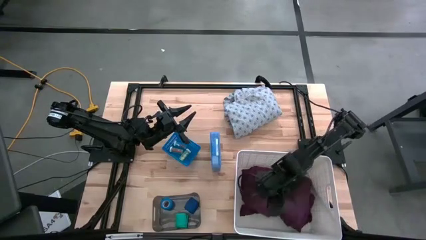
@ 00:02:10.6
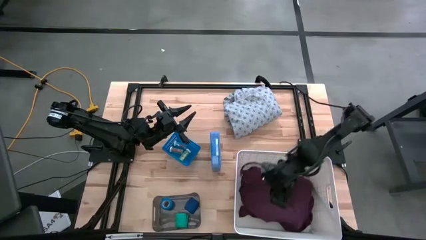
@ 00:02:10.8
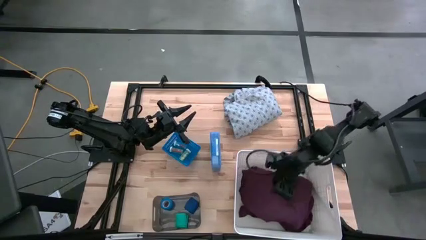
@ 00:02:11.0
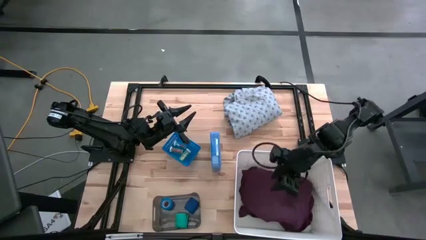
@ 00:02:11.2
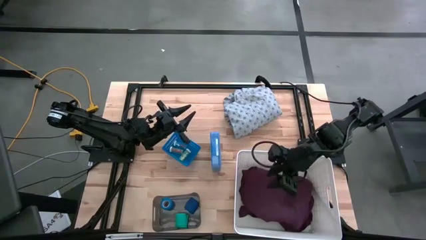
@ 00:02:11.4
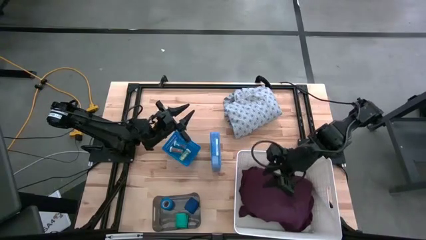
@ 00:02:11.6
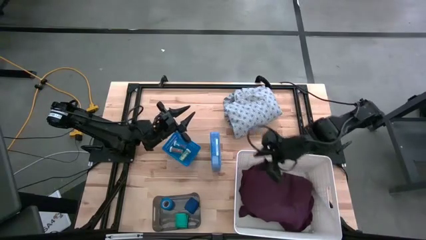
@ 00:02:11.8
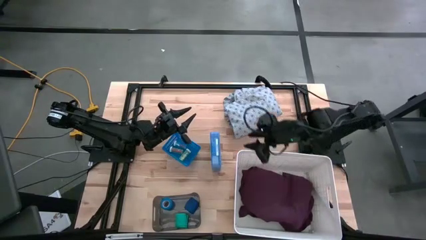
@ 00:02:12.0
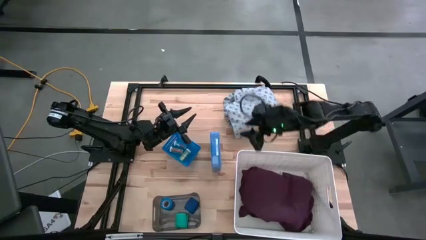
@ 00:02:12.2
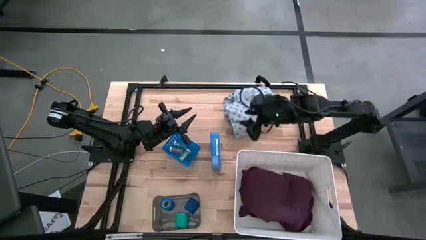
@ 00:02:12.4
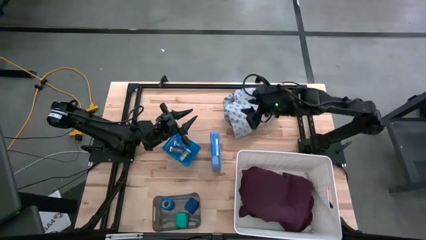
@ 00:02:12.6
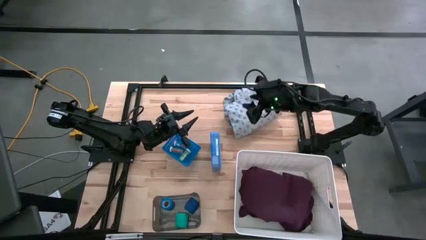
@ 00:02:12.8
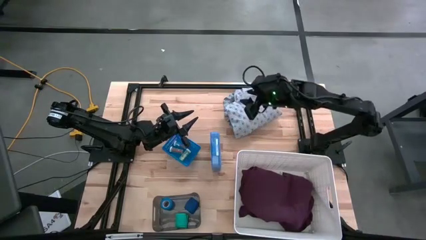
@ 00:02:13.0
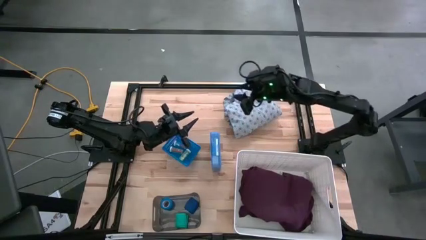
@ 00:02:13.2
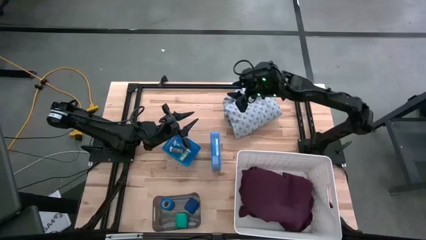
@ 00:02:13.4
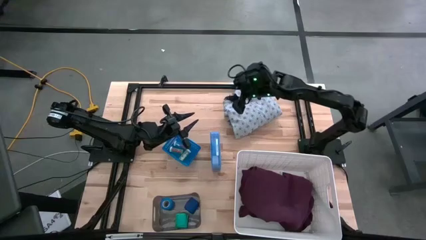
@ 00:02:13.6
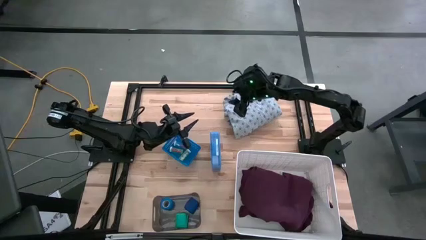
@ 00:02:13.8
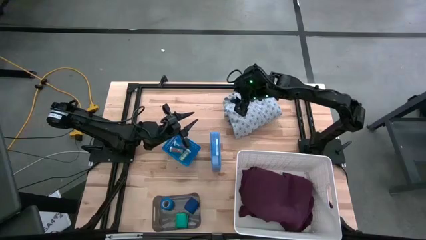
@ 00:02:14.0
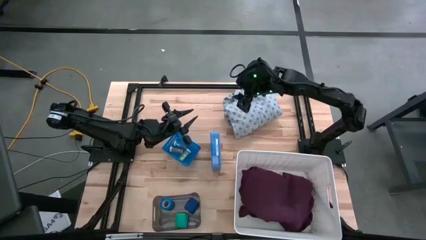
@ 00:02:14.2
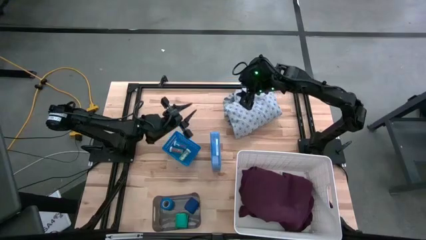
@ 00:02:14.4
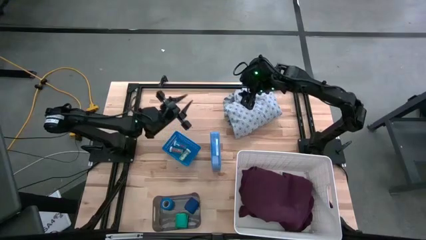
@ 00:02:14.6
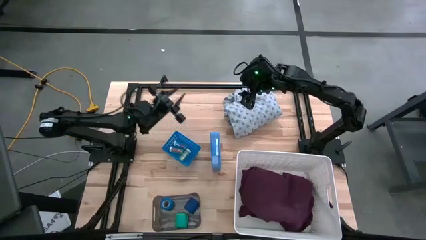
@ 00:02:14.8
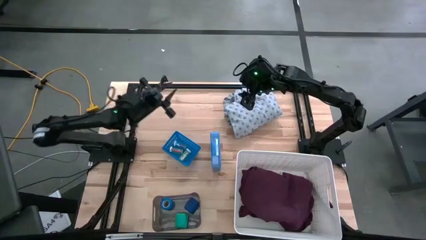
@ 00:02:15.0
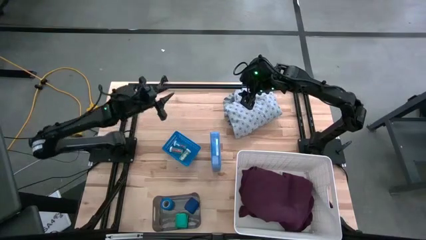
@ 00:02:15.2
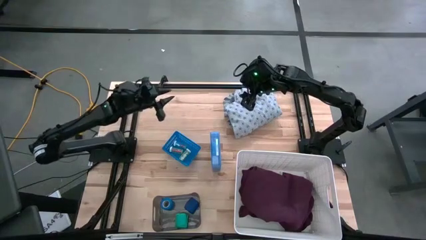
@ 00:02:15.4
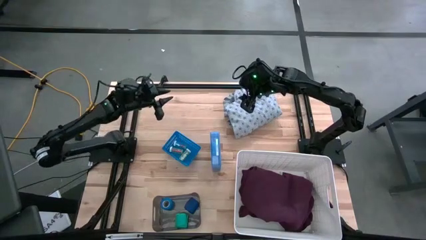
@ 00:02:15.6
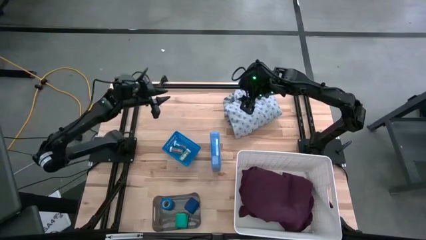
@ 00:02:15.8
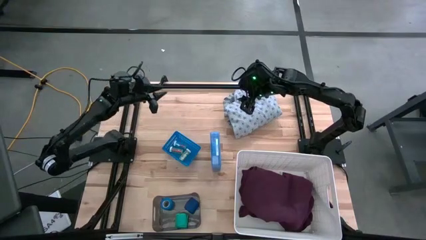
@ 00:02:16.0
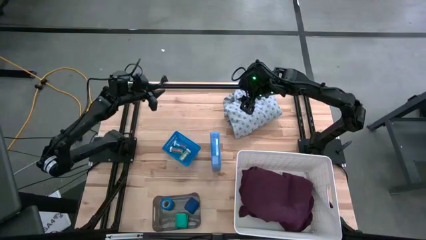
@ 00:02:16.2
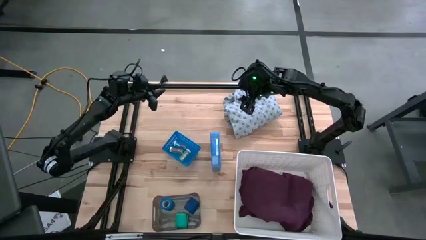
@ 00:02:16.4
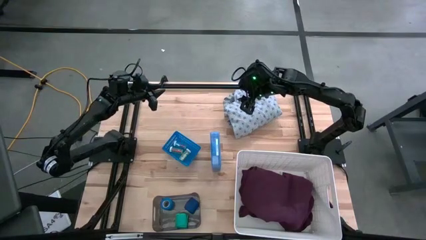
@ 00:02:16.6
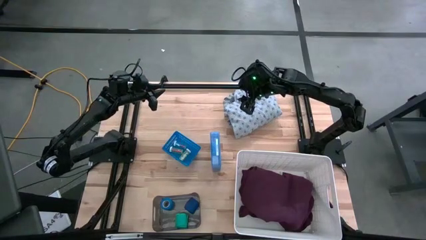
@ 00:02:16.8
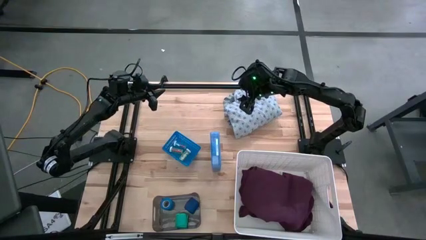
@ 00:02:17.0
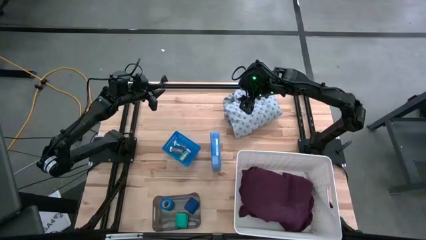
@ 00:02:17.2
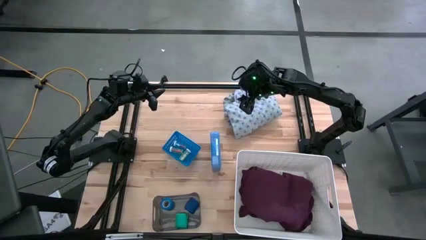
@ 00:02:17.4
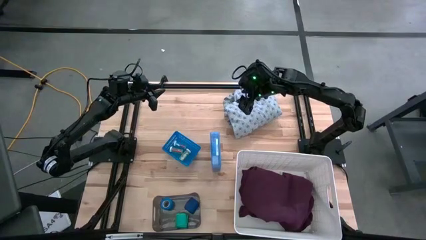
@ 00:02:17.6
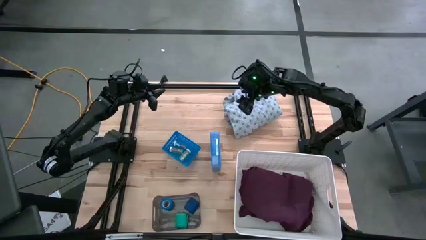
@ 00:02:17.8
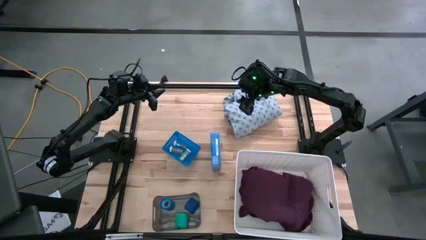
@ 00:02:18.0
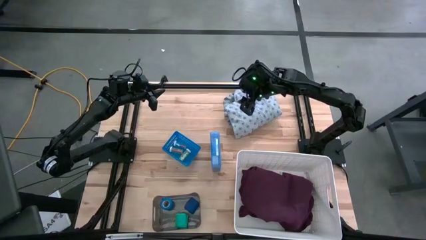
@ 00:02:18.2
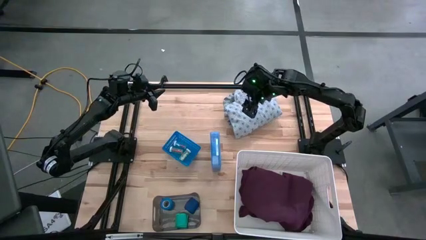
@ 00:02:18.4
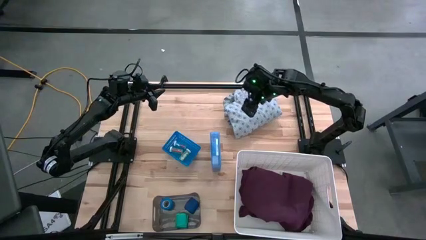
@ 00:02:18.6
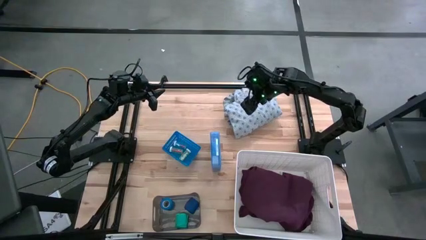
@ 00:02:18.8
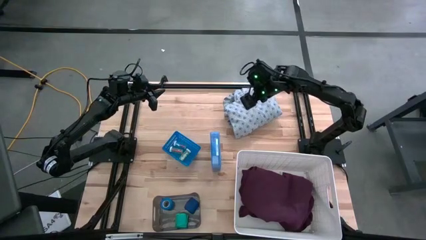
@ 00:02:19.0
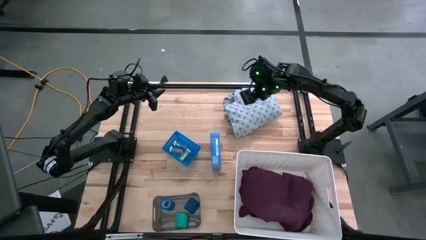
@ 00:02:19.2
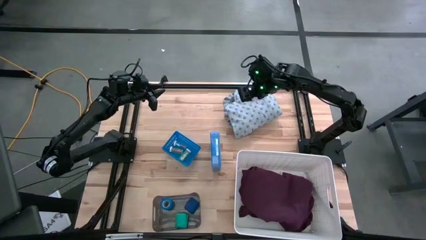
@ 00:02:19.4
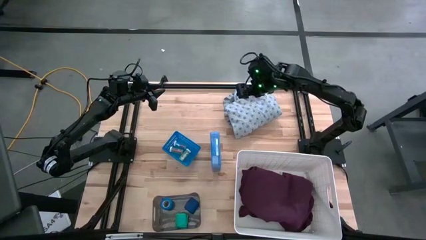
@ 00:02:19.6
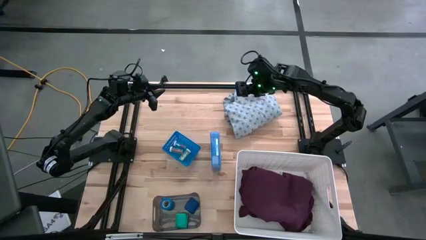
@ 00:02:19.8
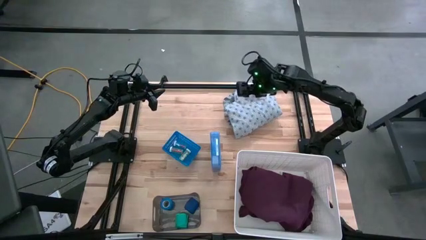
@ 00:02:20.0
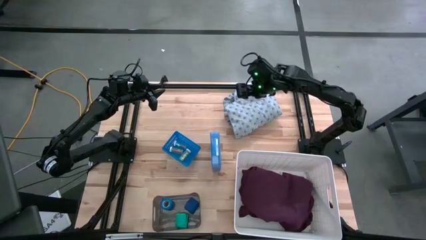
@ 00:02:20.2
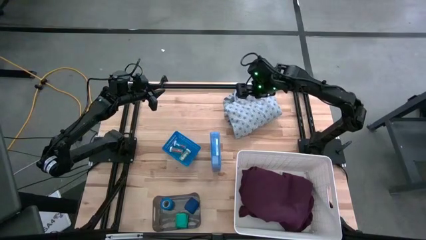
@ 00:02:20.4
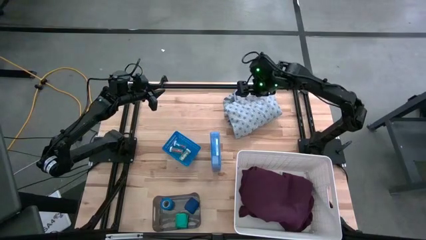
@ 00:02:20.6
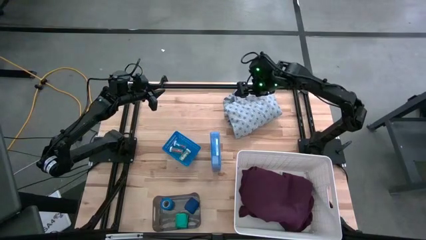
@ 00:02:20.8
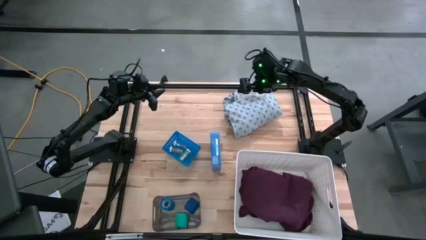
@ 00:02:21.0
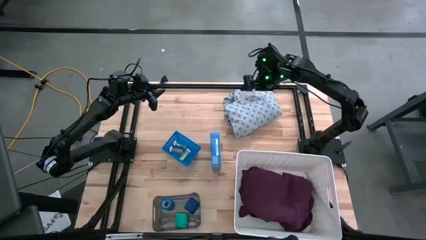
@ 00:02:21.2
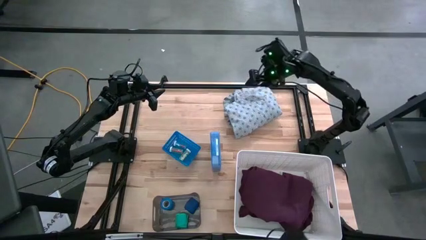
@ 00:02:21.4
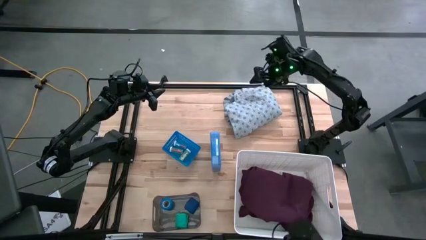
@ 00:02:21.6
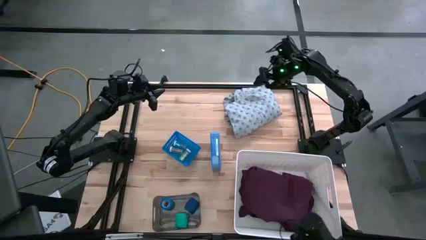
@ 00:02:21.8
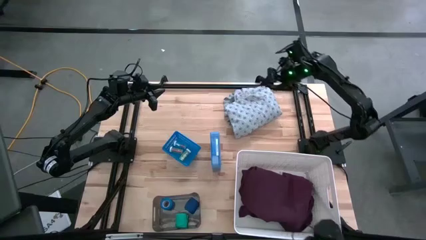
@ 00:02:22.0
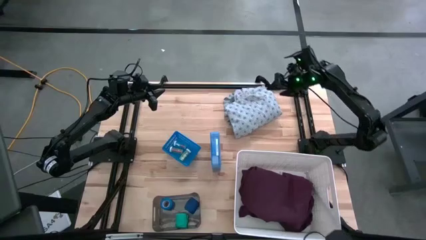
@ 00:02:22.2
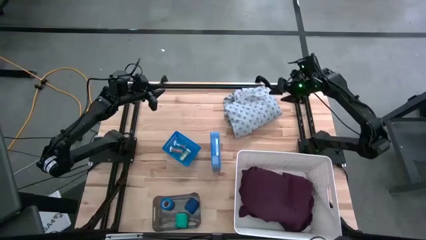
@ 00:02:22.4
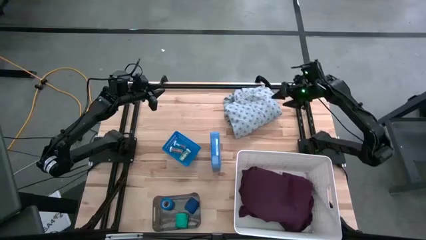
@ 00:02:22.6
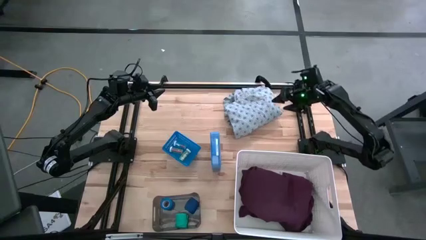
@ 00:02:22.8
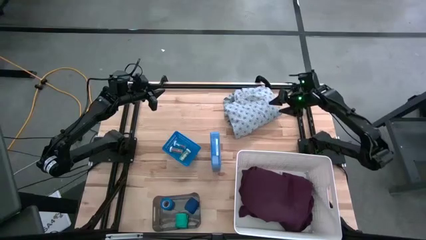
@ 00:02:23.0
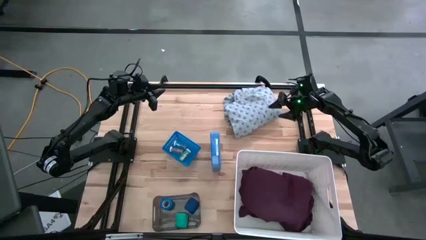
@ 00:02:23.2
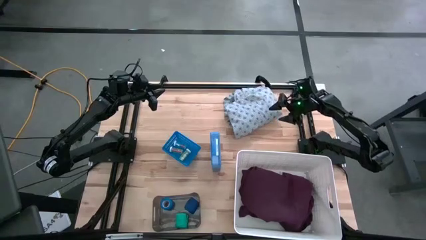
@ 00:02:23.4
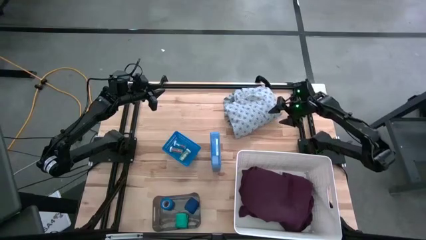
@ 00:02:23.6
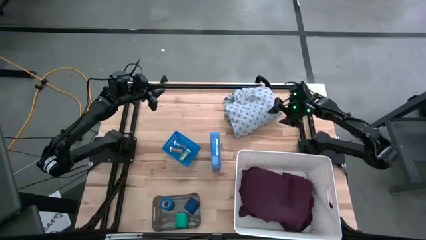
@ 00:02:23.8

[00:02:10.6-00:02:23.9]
Task: Pick & Place Medicine items
Put the blue patient gown into the white bin
